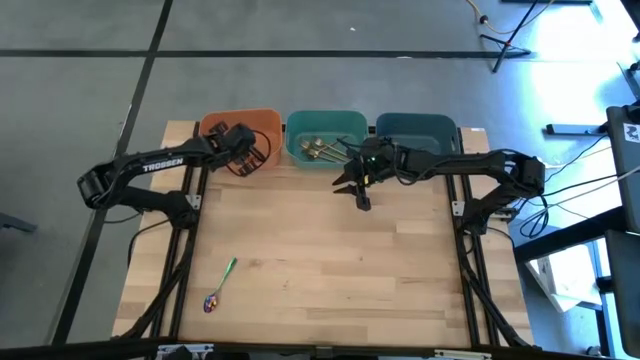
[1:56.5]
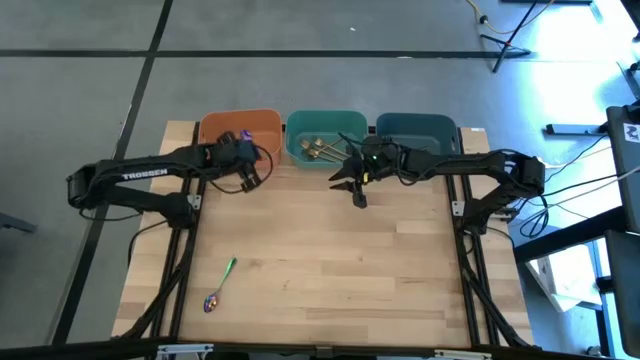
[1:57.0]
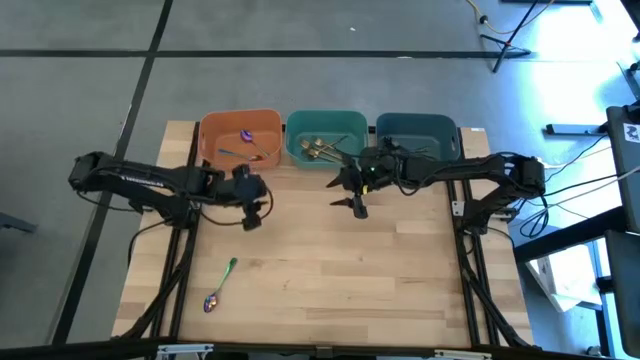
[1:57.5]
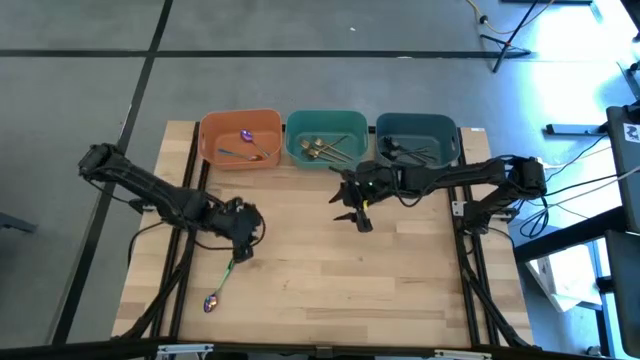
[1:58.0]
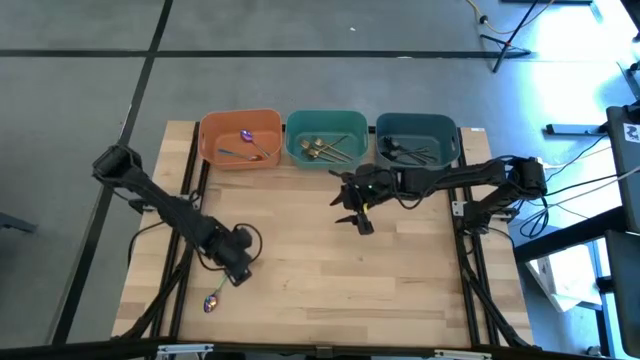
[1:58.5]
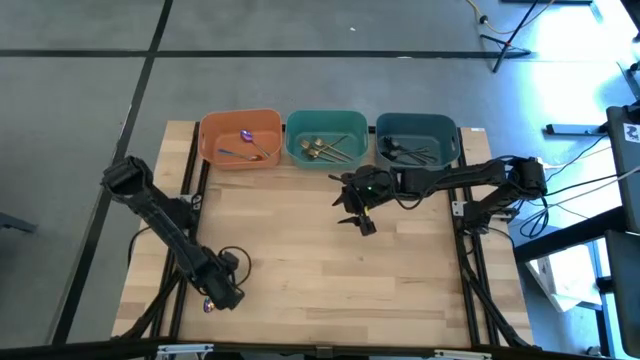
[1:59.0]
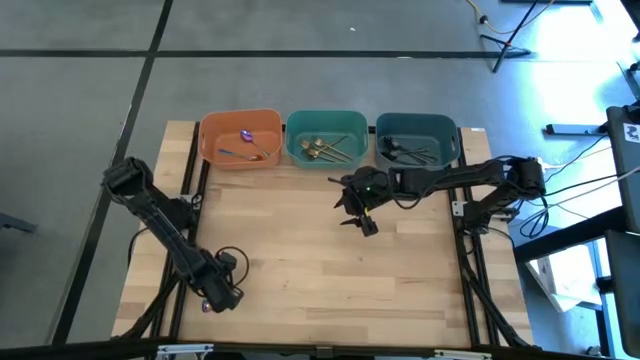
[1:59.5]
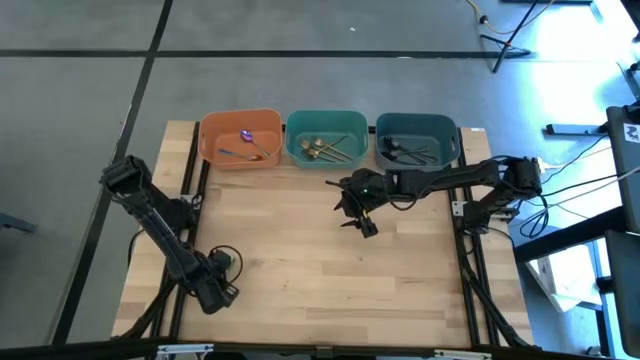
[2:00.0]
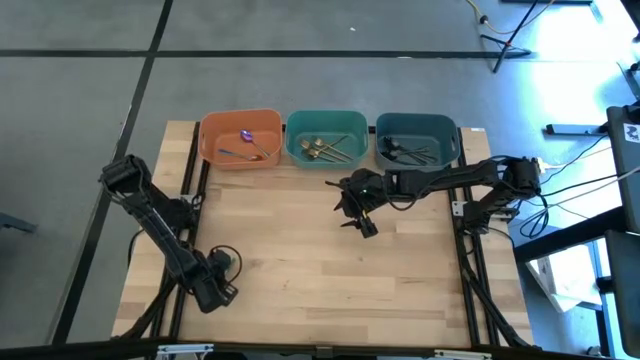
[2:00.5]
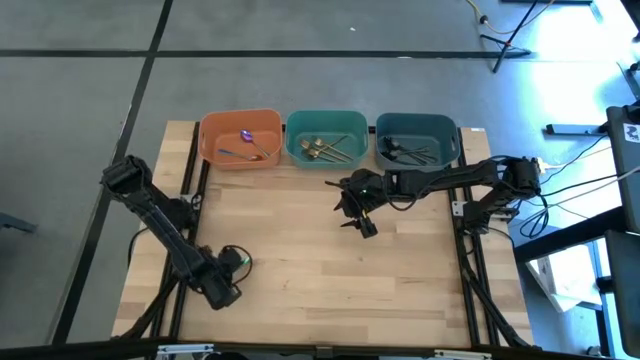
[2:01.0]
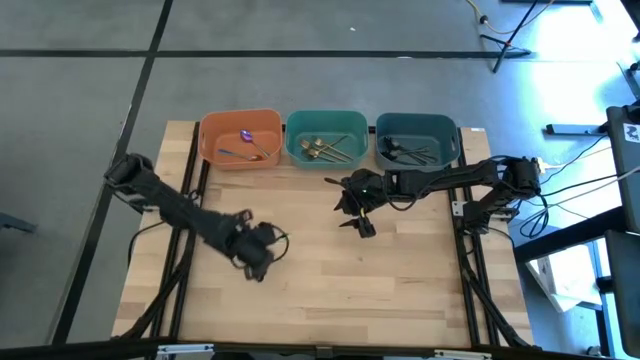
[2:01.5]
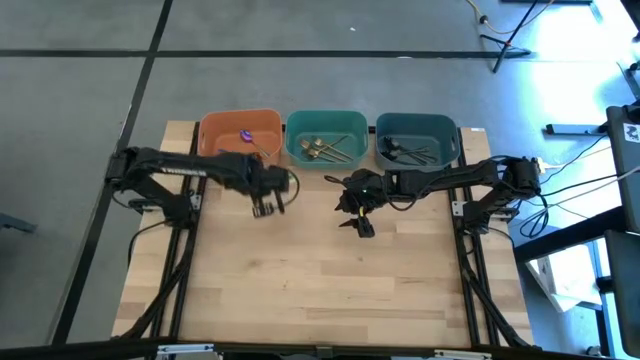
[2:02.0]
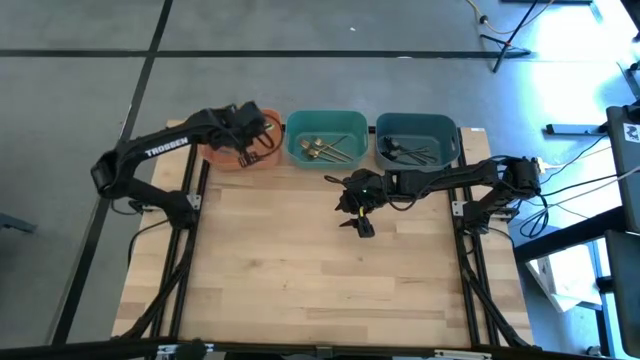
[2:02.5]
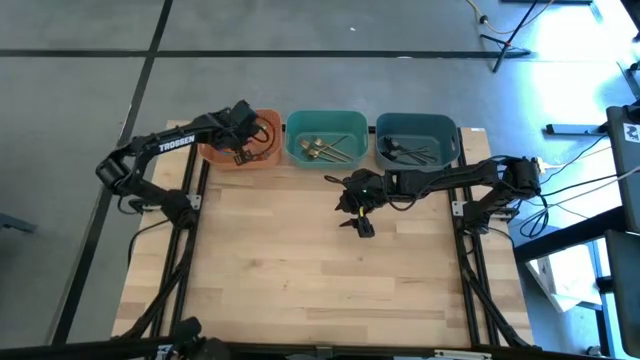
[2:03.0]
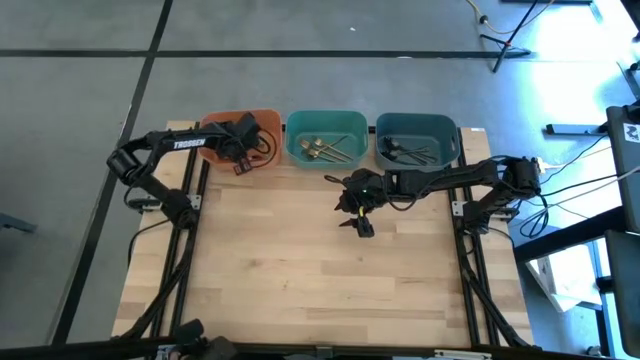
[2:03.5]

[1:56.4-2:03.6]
Task: Sort silverware by color (type)
Put the violet spoon into the orange bin

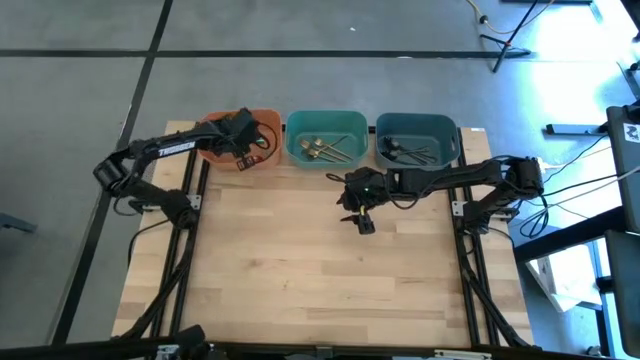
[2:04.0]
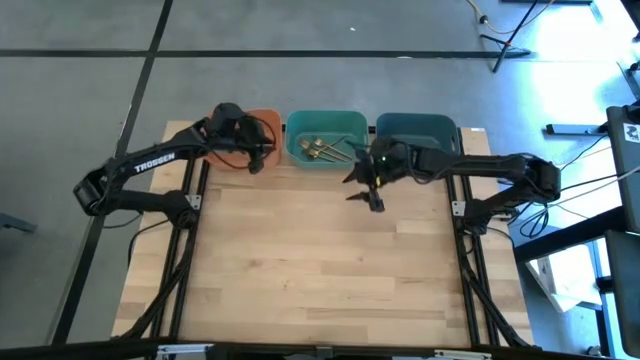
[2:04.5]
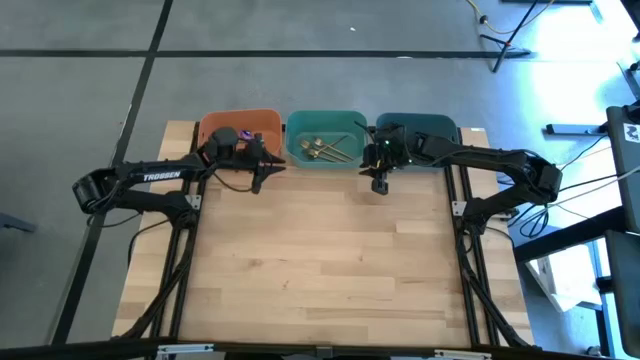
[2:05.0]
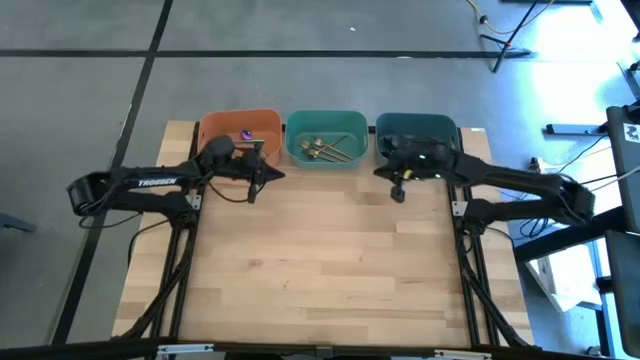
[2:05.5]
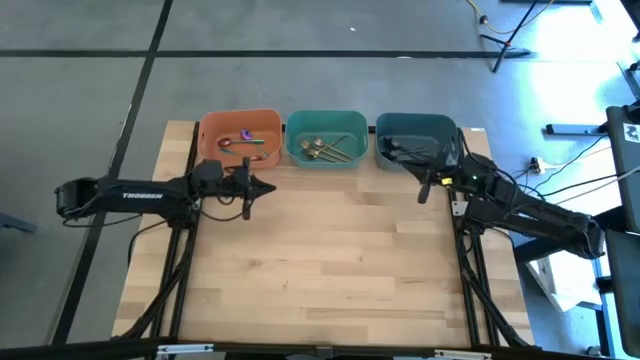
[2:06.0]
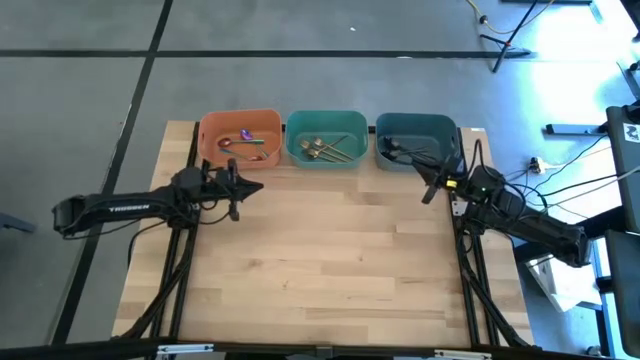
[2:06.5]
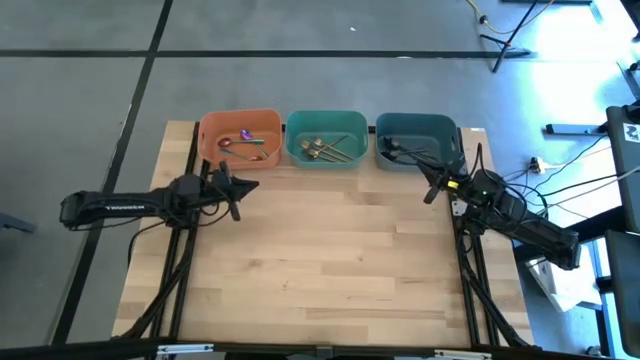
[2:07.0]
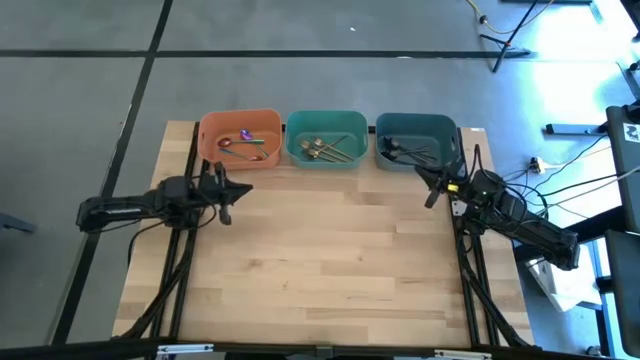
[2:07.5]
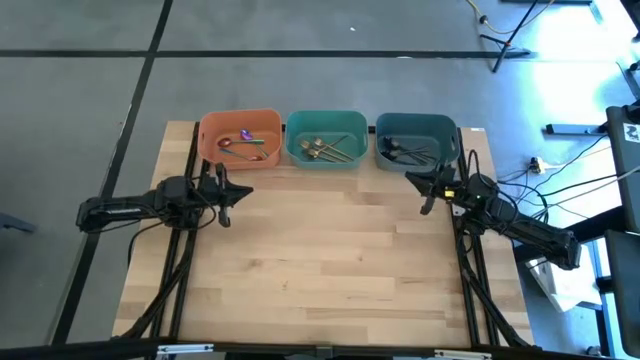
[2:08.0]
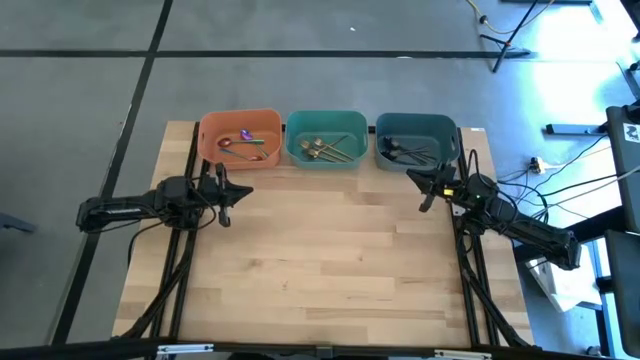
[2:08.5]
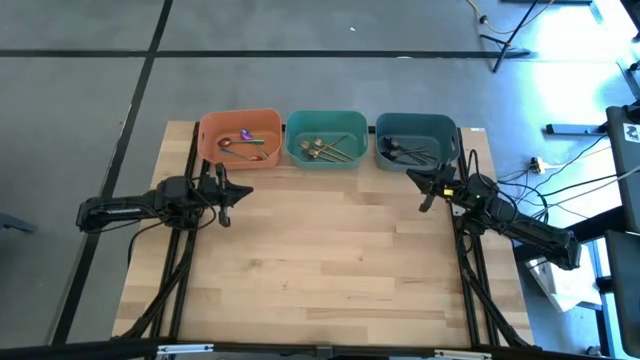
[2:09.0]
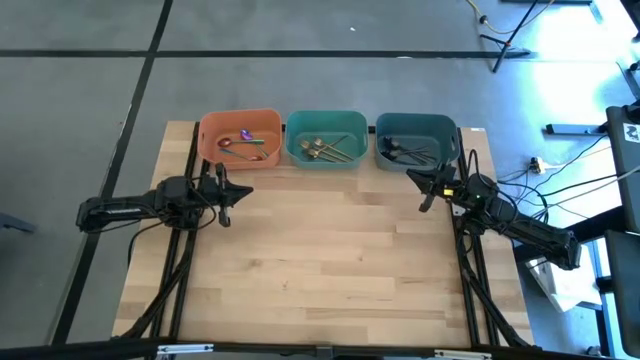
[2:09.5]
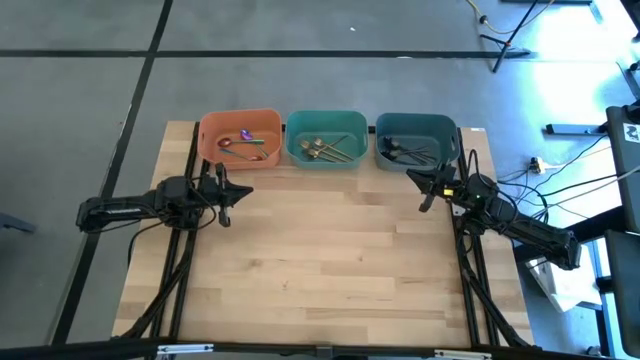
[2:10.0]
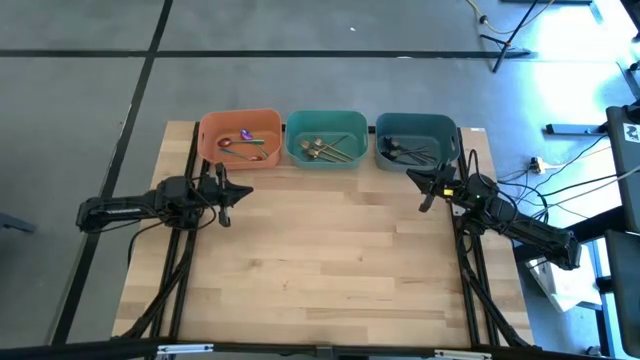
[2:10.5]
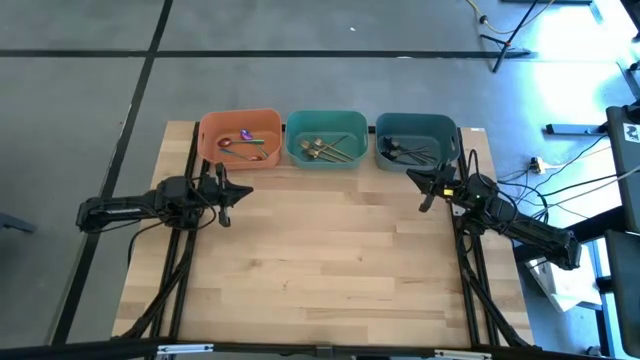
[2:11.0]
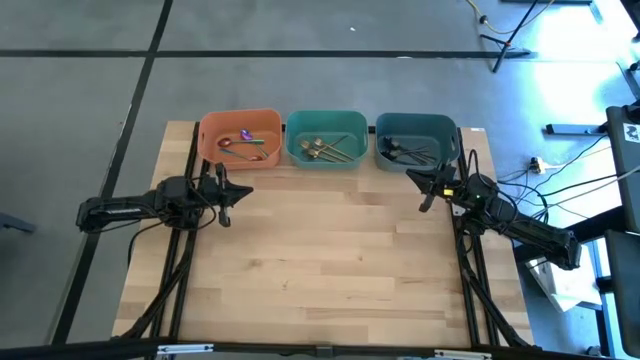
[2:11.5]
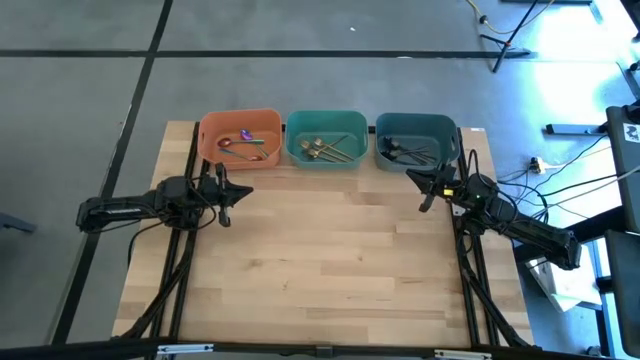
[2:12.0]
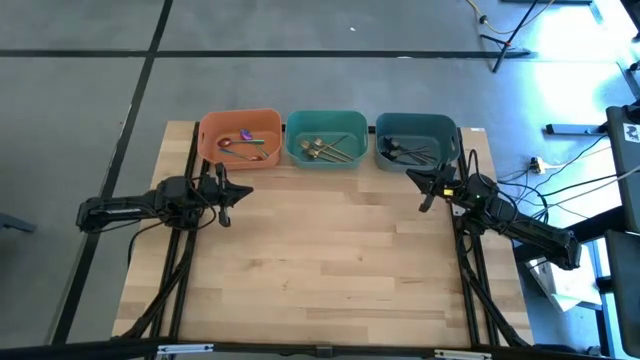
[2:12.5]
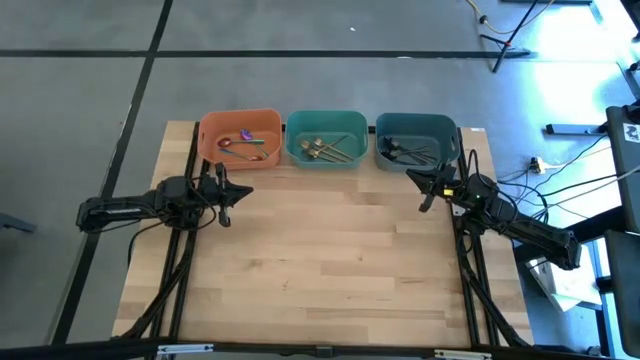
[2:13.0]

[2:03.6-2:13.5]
Return to Home Position

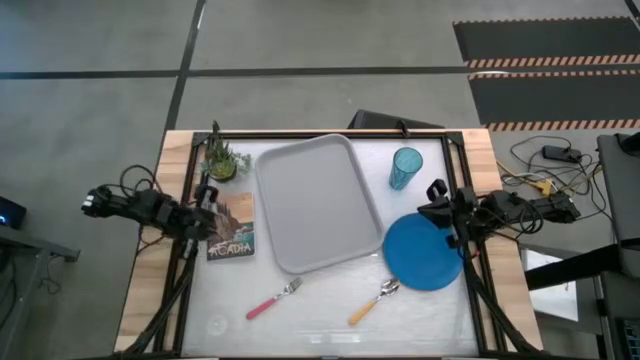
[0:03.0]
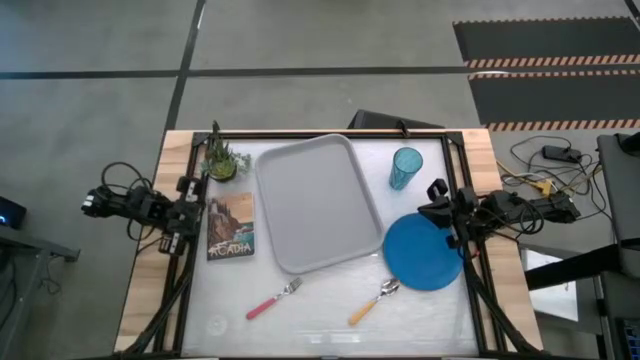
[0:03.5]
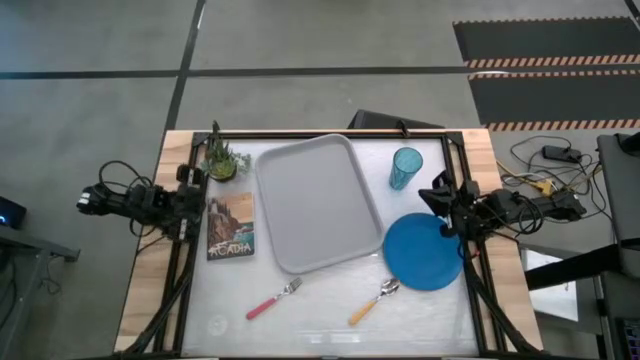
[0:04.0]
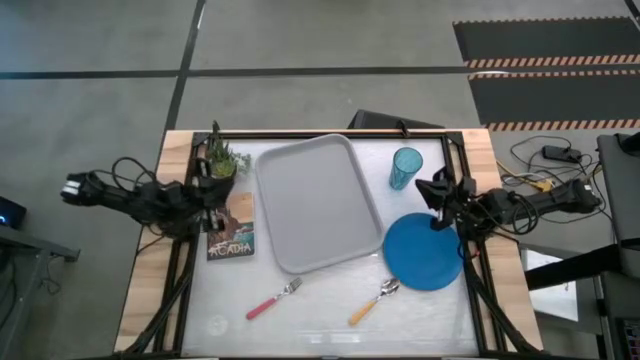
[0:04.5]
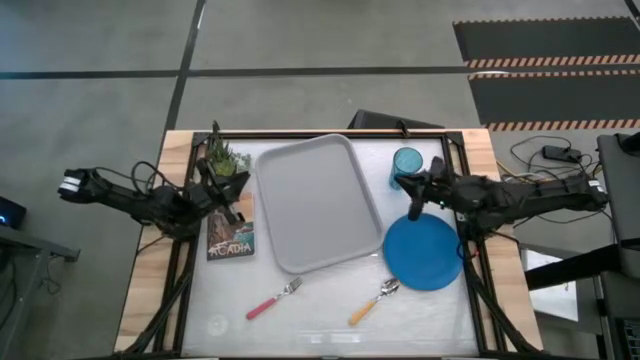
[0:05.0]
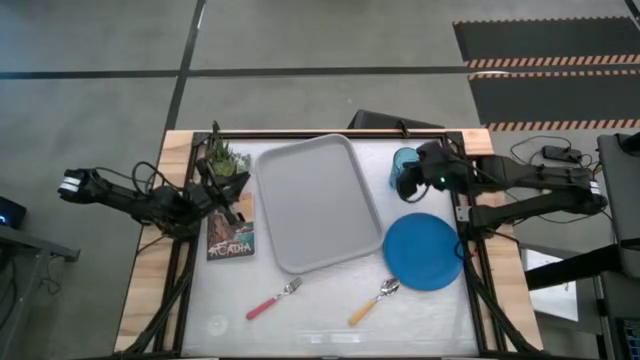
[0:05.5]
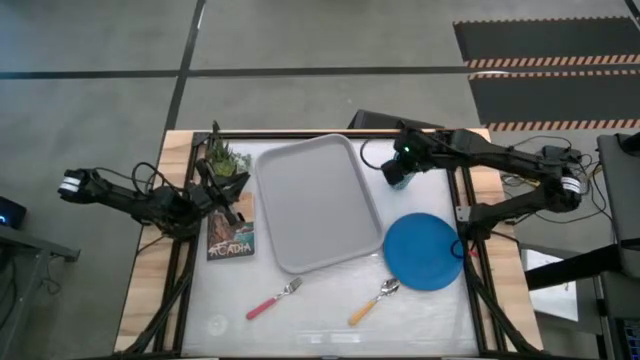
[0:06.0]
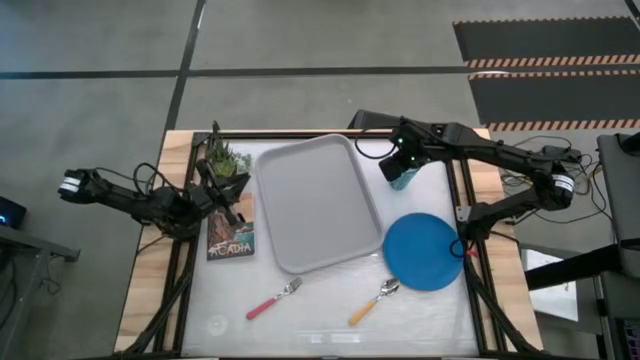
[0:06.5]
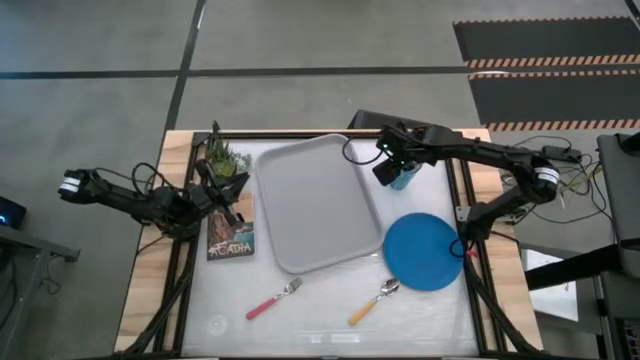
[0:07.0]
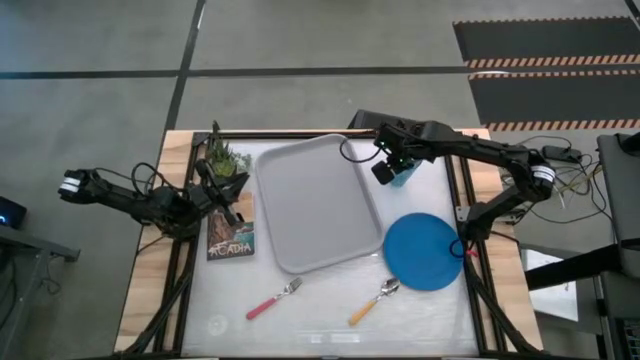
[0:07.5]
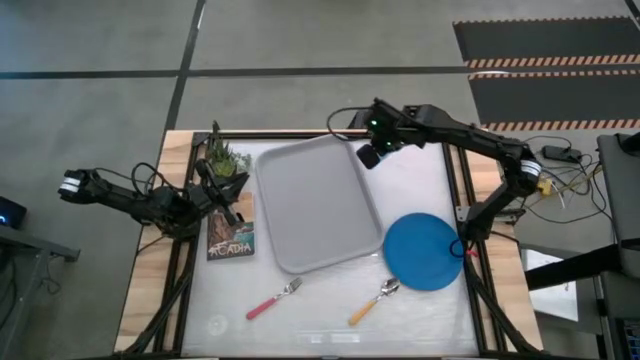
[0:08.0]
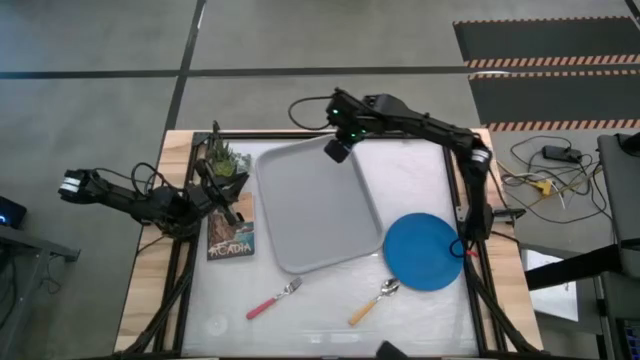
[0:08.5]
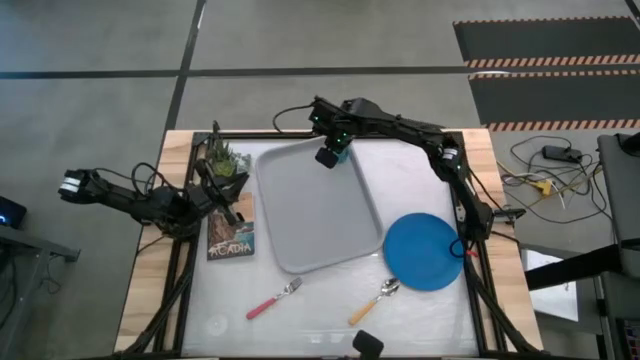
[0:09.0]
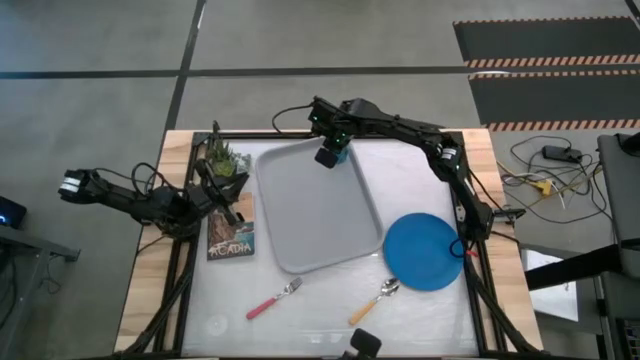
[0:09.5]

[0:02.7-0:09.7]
Task: Pick and place plate/cup/fork/spoon on tray
Put the blue cup on the top left of the gray serving tray
